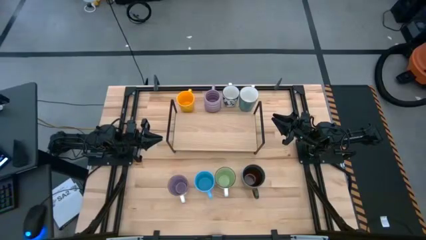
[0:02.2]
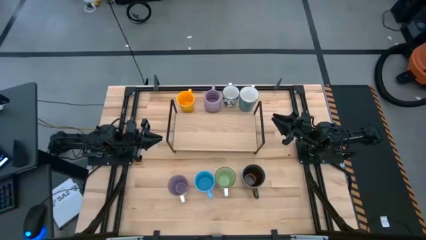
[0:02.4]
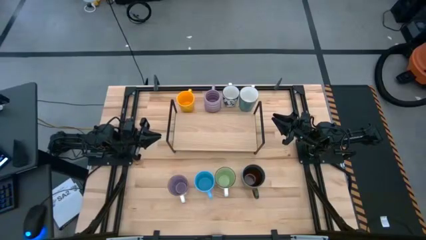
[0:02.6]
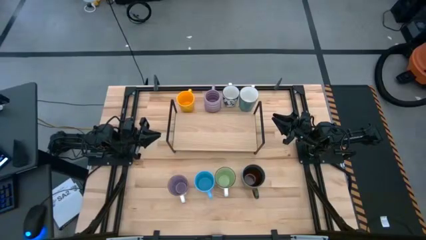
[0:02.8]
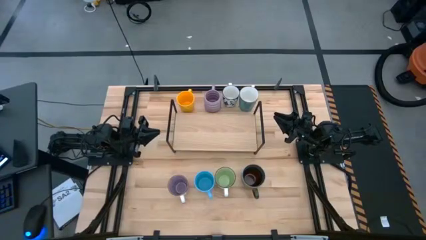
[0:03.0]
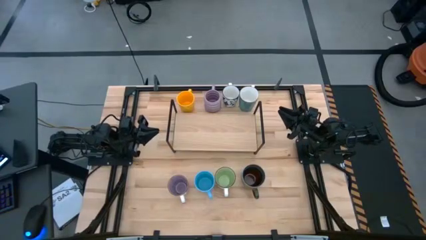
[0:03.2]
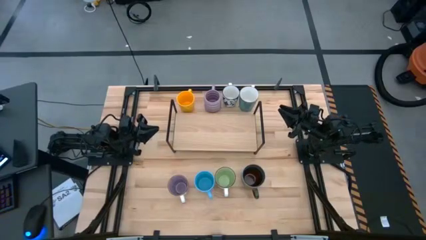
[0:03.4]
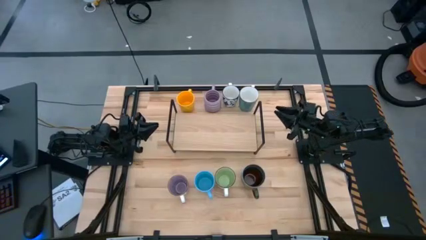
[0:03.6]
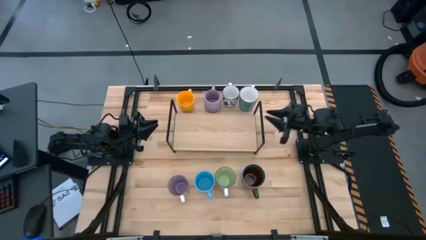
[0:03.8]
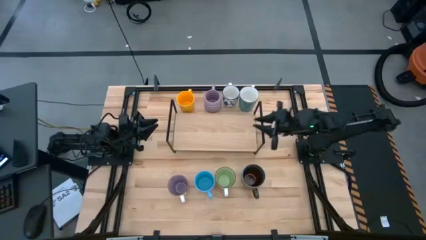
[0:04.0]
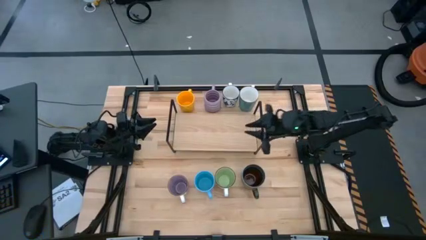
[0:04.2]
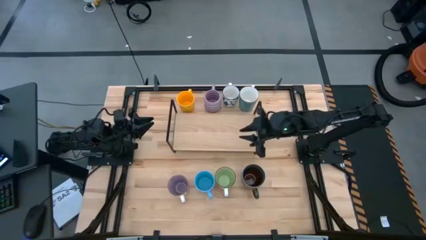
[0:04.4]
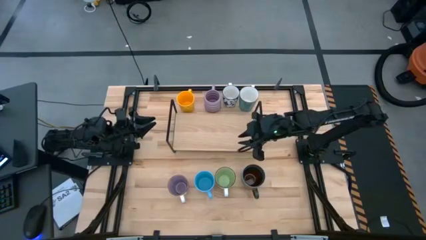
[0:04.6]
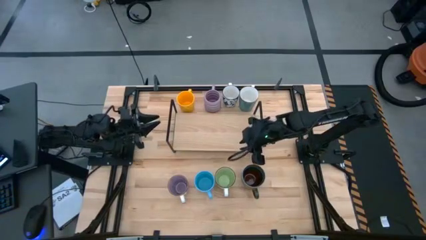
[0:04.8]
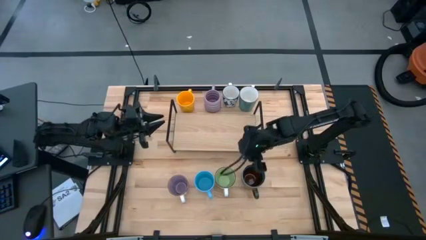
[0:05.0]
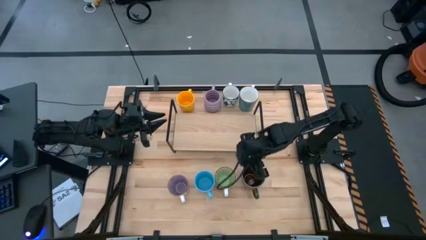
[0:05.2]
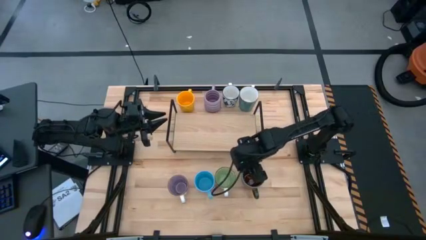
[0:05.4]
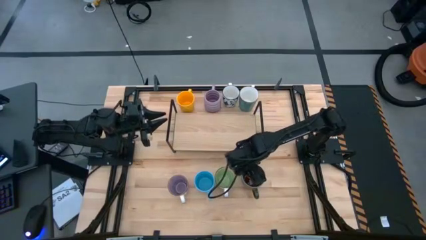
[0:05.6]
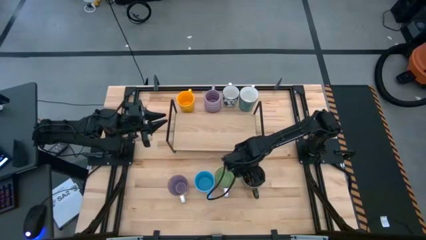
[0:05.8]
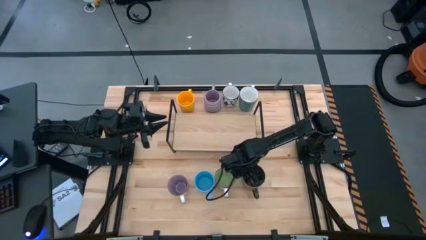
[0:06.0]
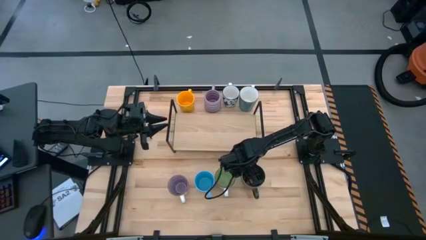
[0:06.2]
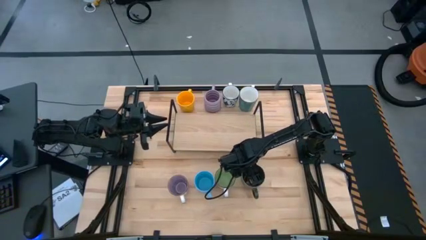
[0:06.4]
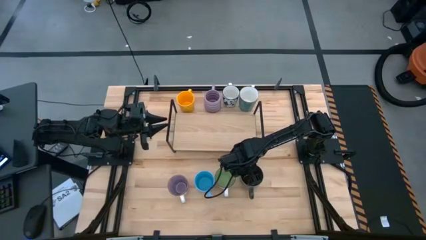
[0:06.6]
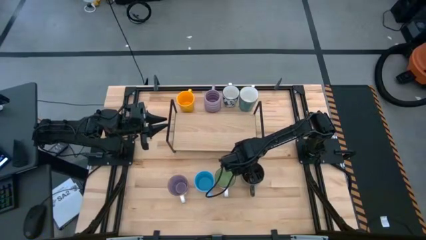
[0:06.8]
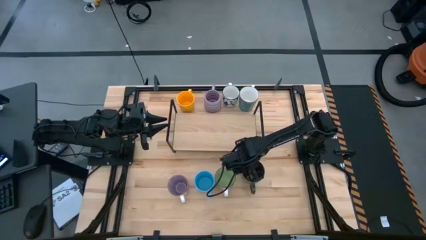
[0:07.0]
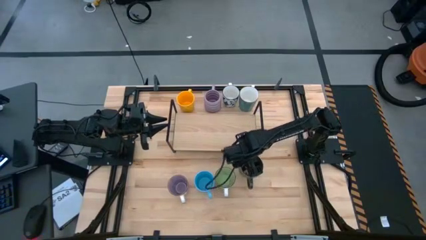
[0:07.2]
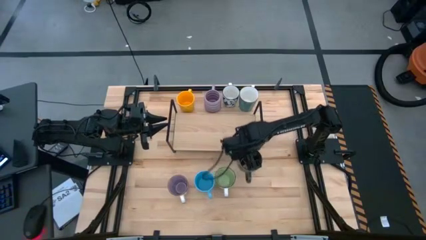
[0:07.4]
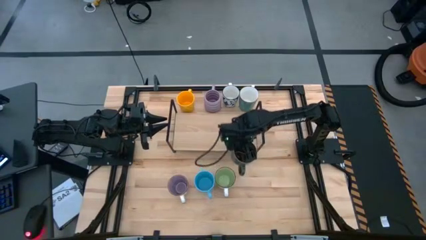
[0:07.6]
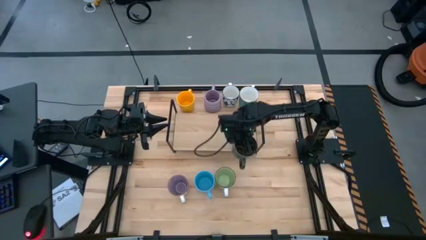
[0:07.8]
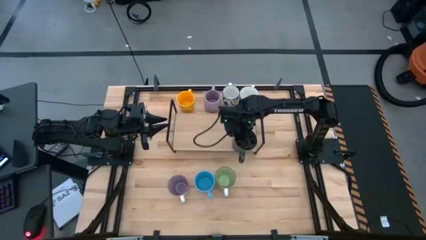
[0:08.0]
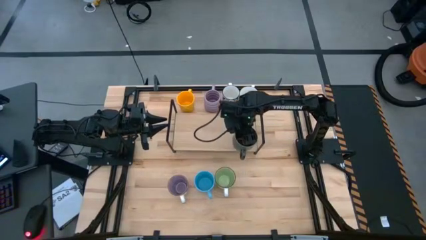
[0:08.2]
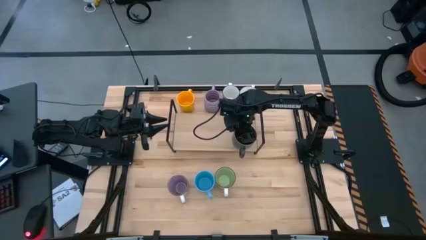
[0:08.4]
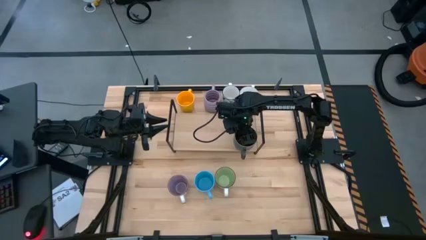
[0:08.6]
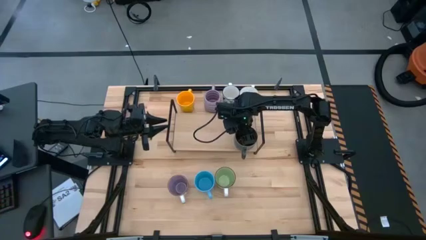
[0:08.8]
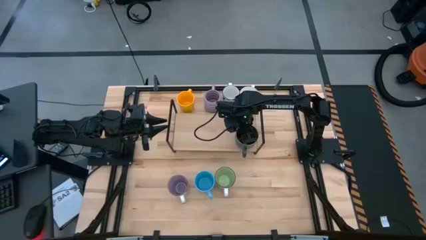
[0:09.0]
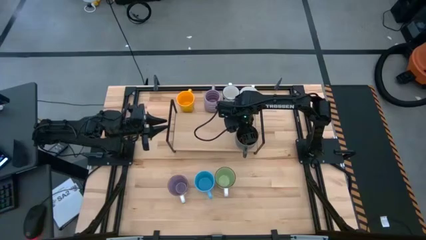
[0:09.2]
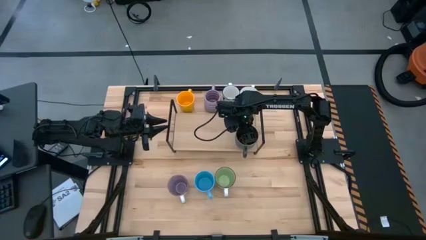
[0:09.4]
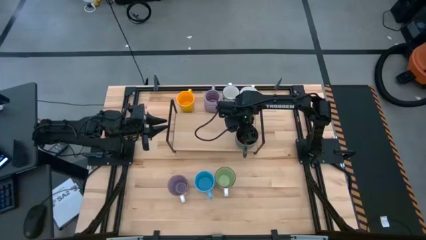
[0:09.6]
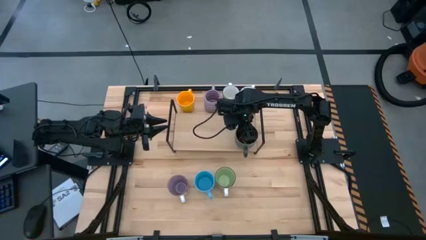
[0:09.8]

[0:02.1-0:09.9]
Task: Place coffee mugs
Put the dark blue mug on the shelf

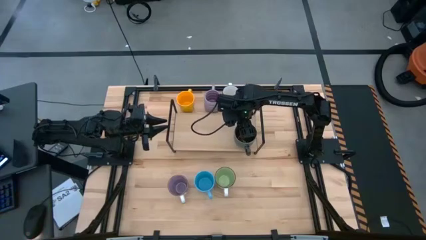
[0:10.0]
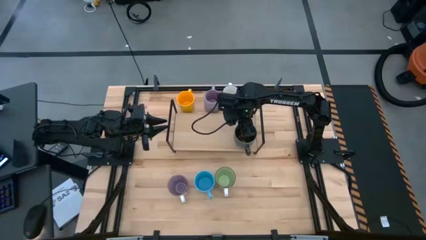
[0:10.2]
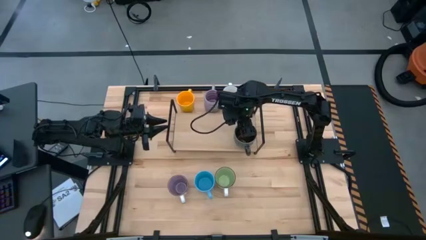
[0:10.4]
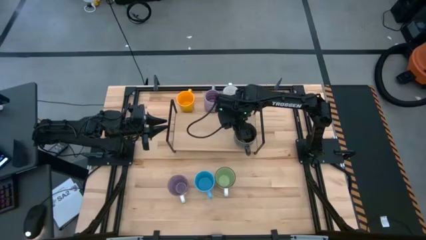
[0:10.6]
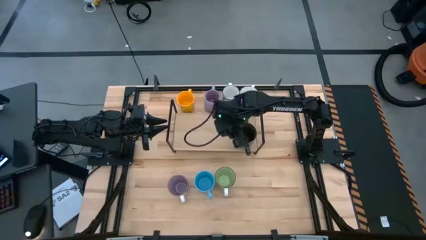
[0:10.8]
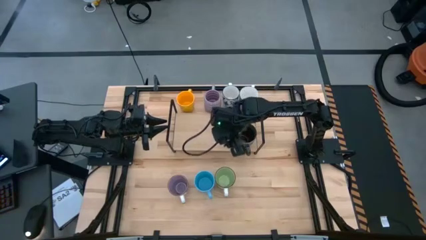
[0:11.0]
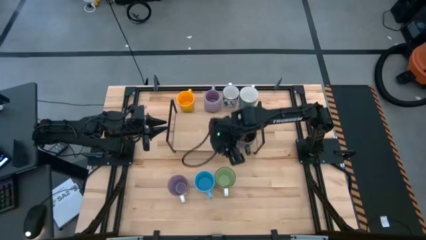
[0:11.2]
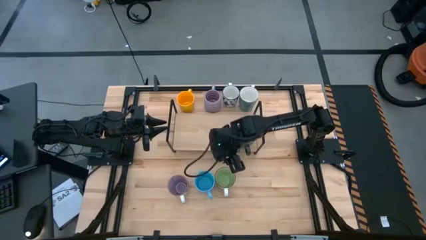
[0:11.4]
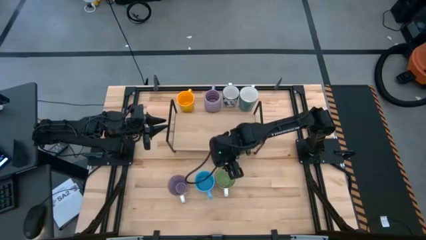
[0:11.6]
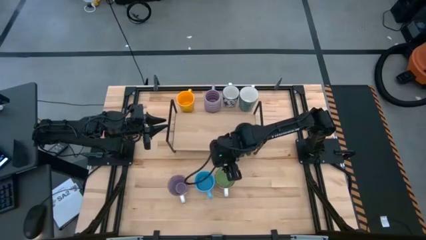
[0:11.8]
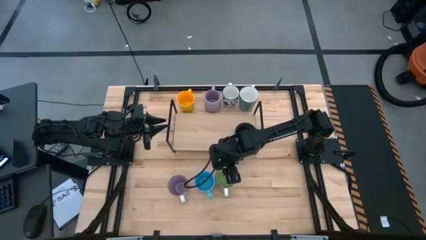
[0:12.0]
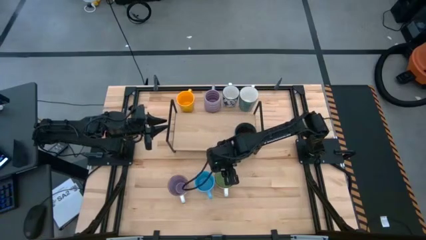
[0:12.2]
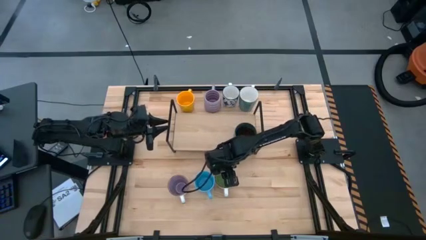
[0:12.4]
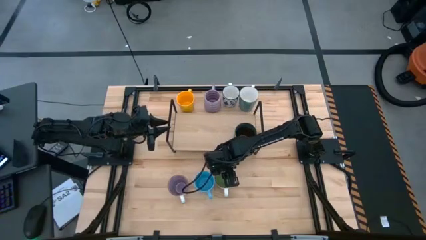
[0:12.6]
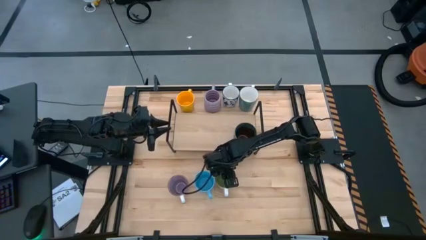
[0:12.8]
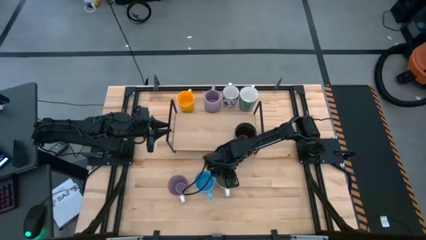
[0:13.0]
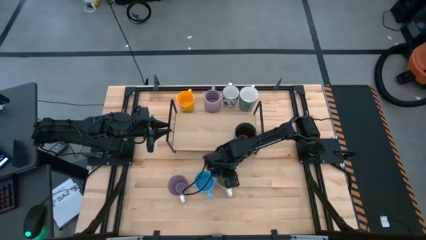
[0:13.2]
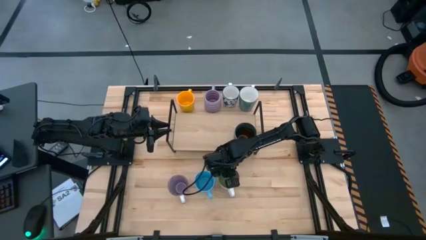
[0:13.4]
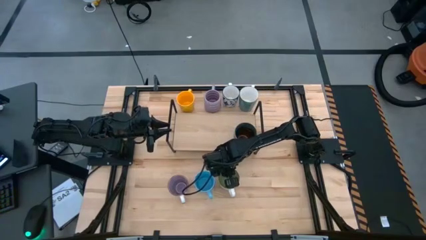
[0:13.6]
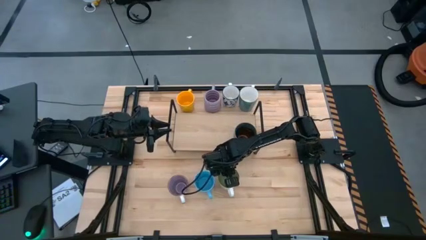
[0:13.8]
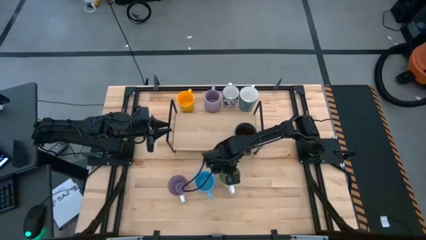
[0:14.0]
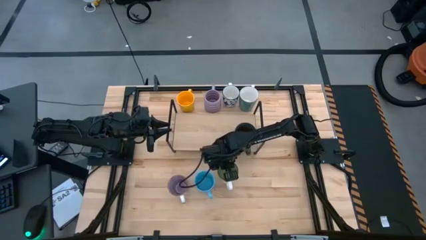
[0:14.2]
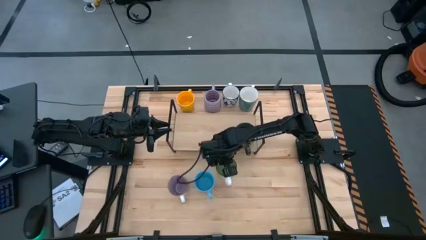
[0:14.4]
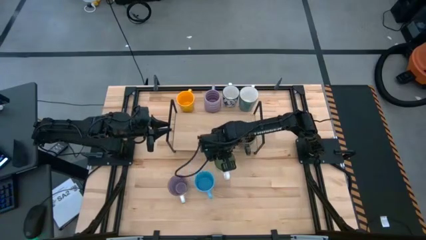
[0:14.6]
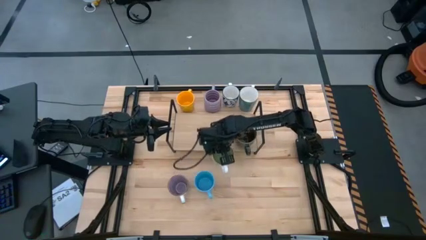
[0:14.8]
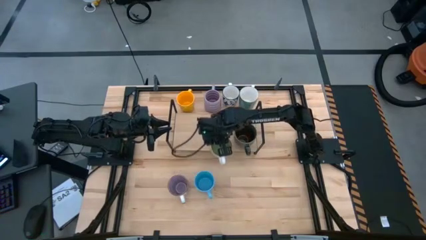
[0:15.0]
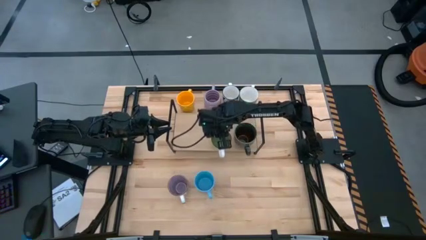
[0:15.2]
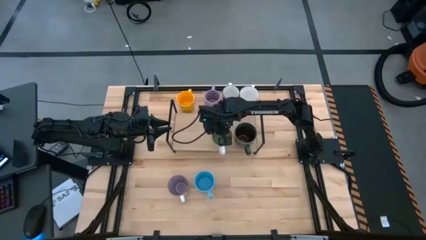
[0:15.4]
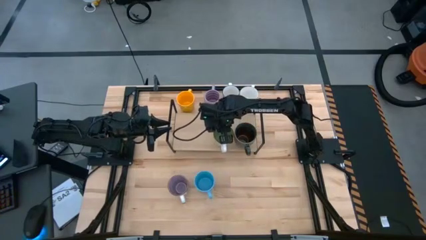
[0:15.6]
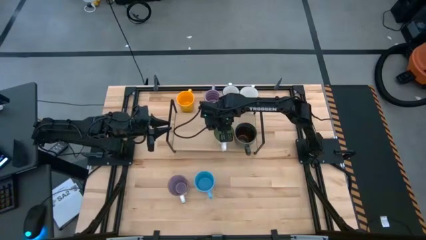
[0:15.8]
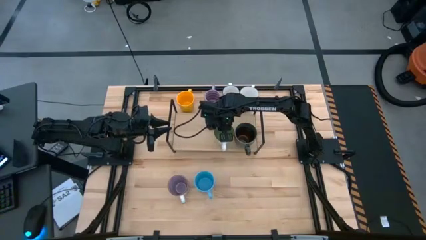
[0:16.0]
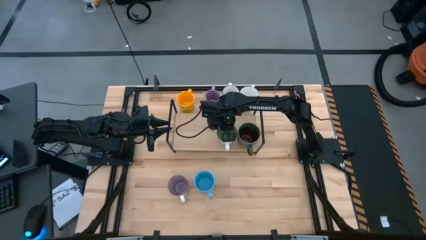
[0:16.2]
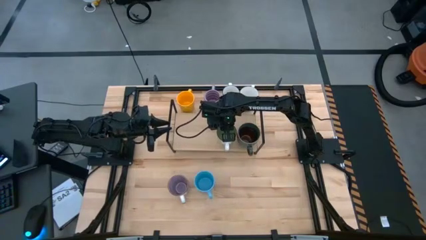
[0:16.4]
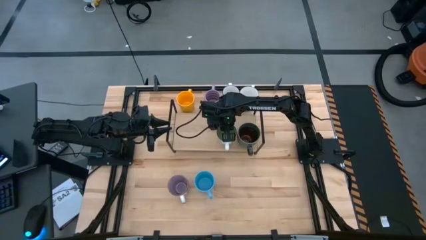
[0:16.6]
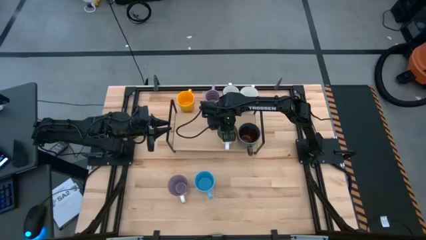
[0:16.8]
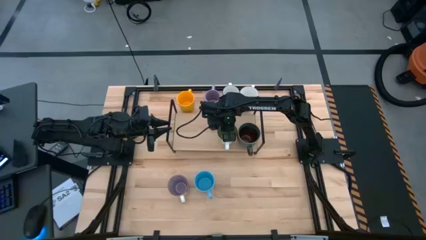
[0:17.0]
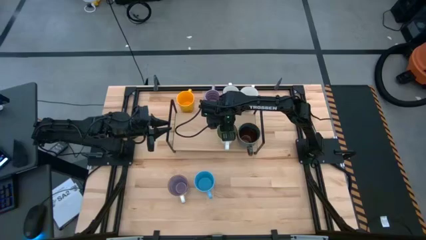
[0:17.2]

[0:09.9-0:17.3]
Put the green mug on the shelf
